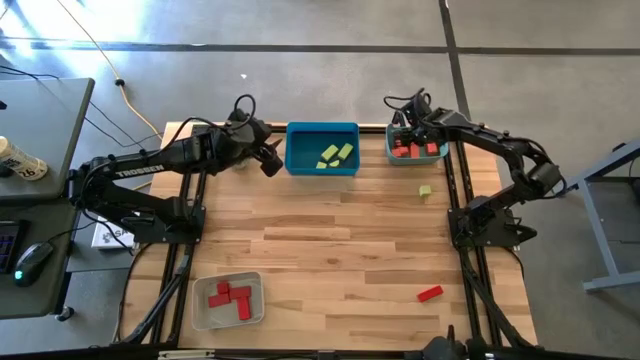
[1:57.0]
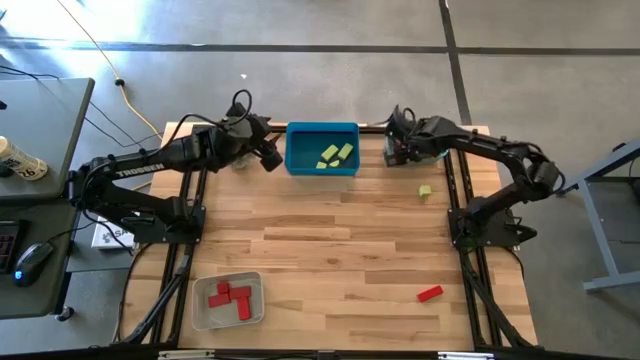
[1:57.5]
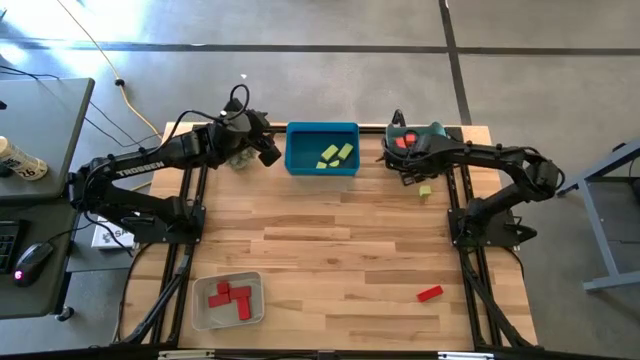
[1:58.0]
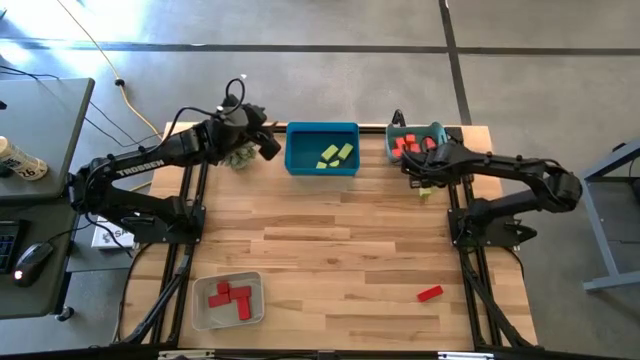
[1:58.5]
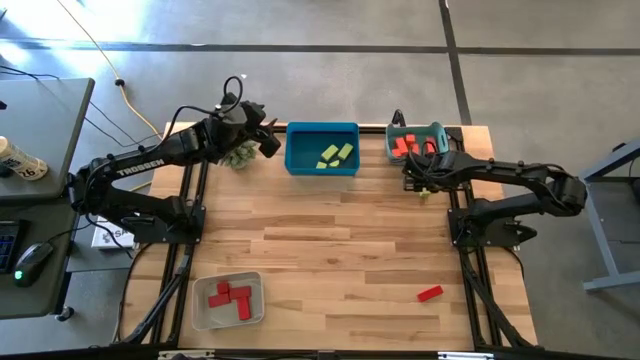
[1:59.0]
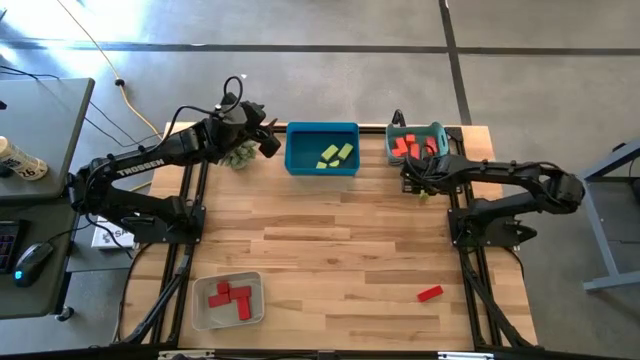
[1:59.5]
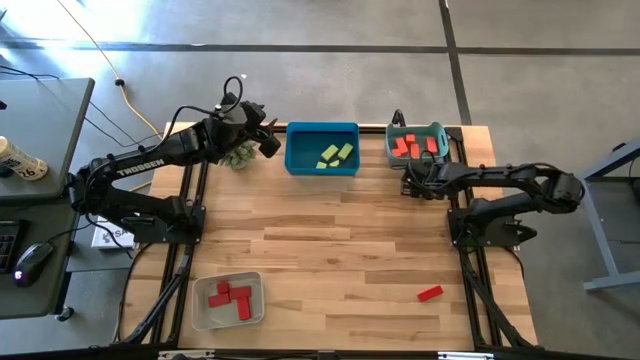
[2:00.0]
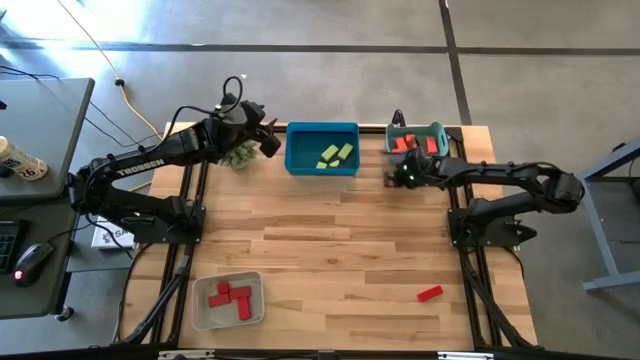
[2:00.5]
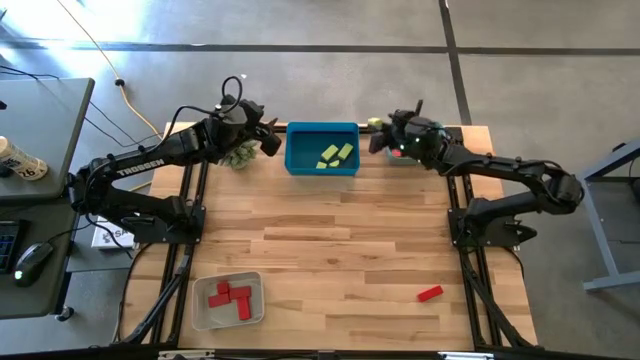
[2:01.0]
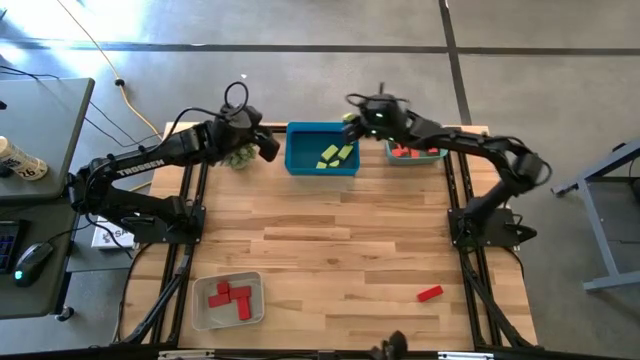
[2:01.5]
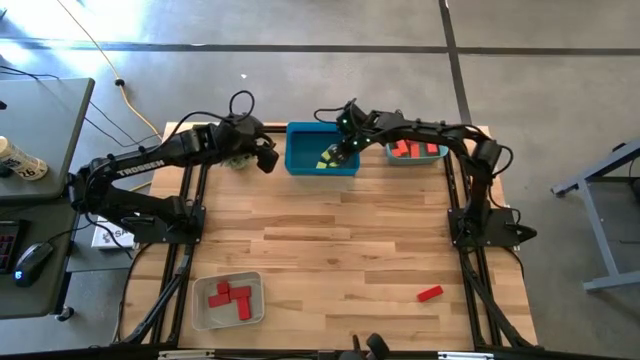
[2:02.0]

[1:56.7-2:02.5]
Task: Sort & place blocks by color
Put the green block into the blue bin

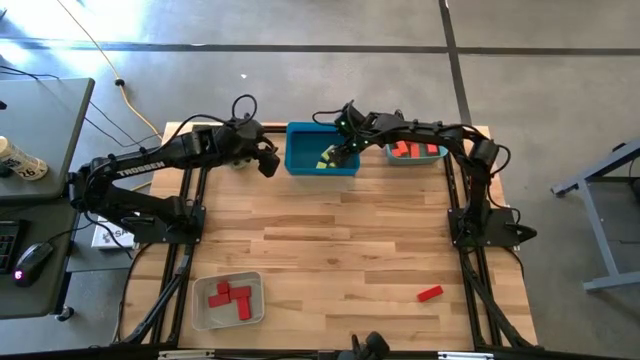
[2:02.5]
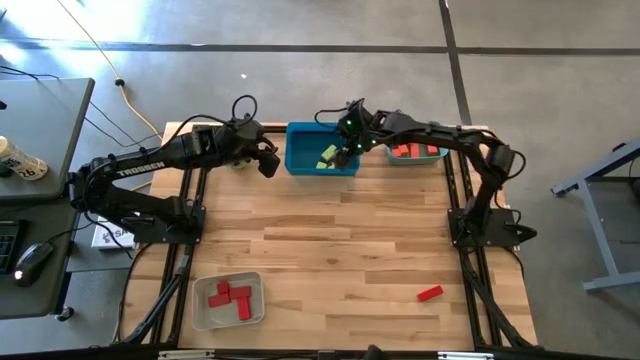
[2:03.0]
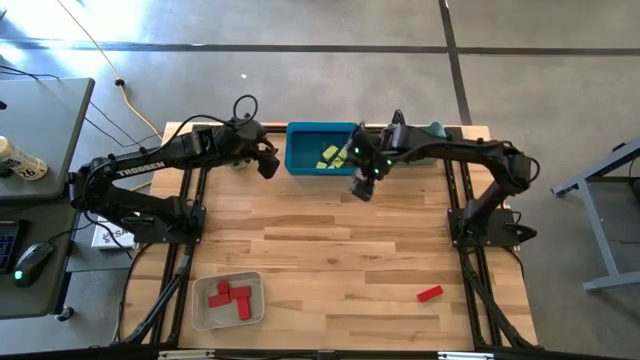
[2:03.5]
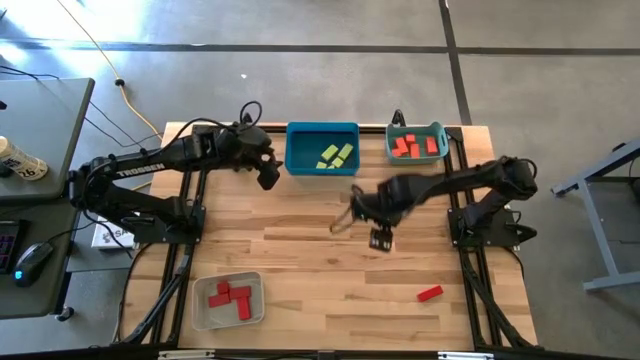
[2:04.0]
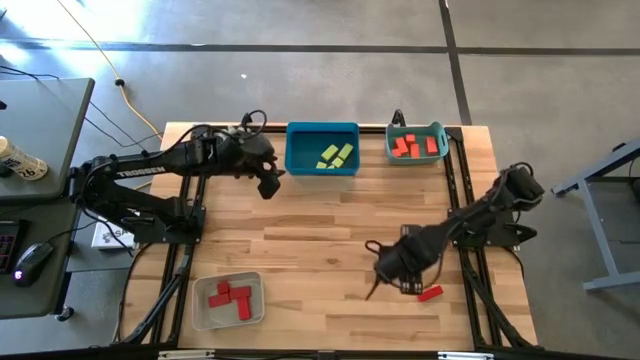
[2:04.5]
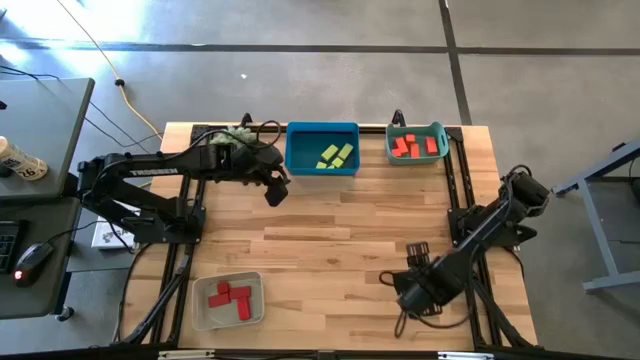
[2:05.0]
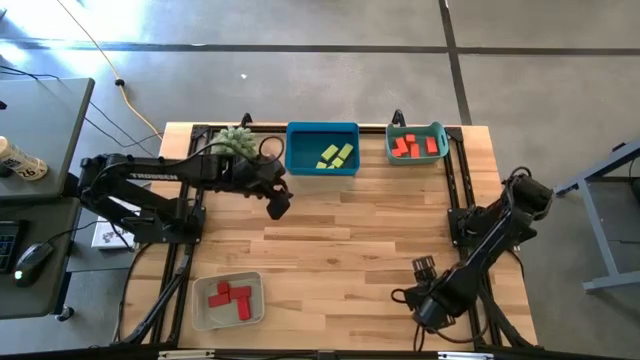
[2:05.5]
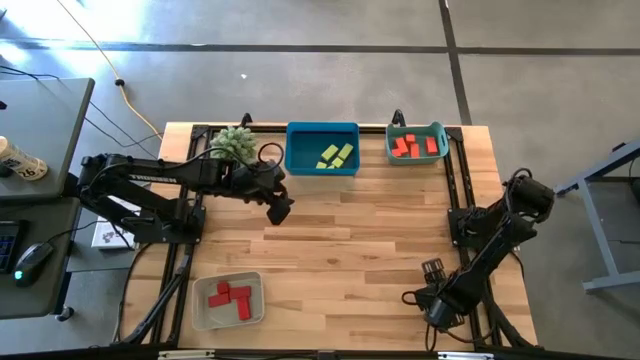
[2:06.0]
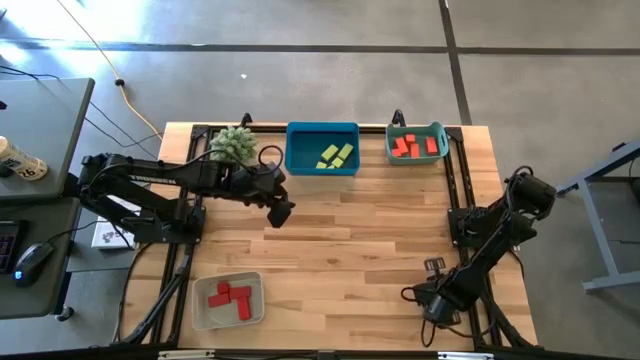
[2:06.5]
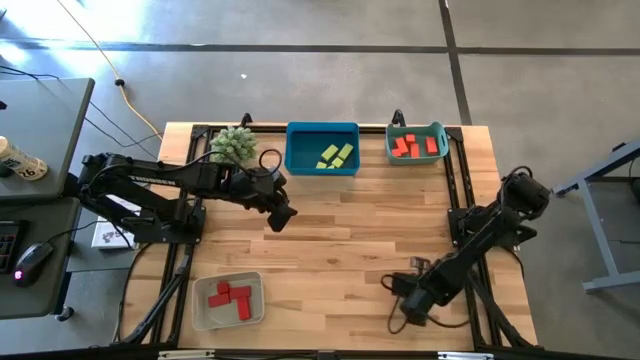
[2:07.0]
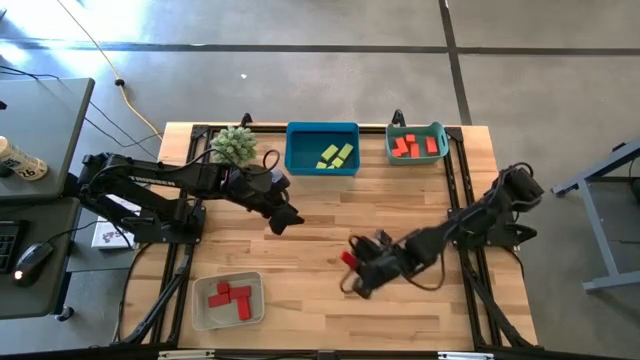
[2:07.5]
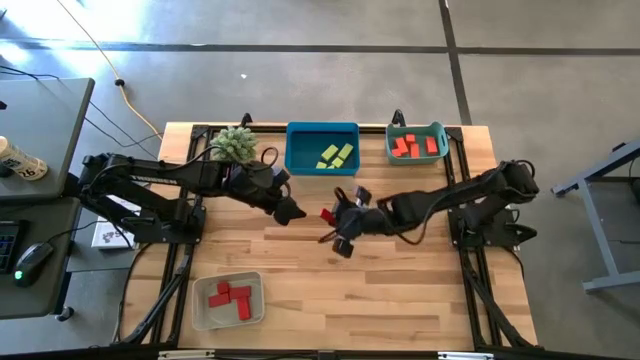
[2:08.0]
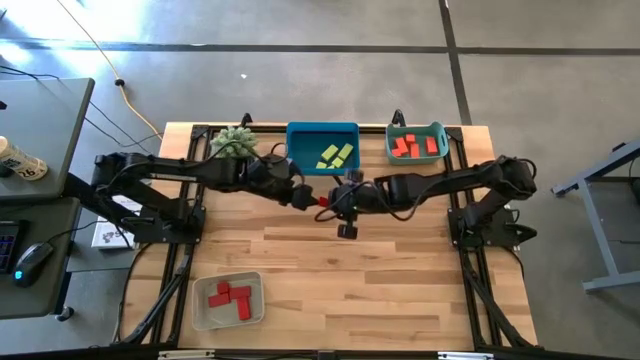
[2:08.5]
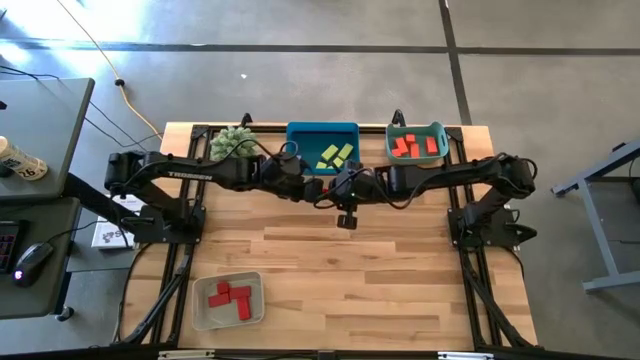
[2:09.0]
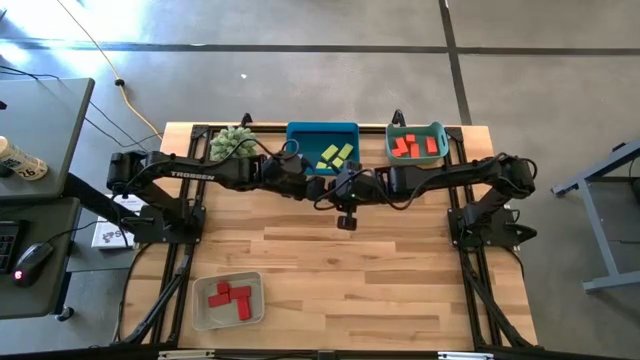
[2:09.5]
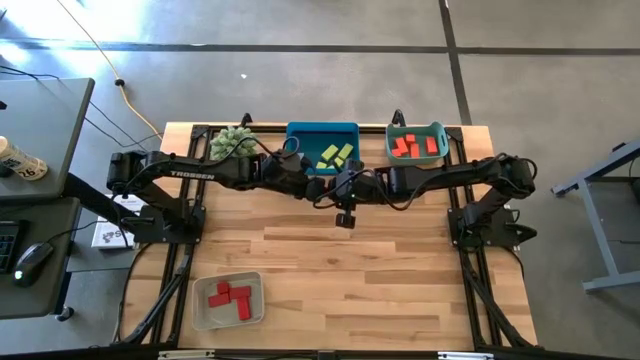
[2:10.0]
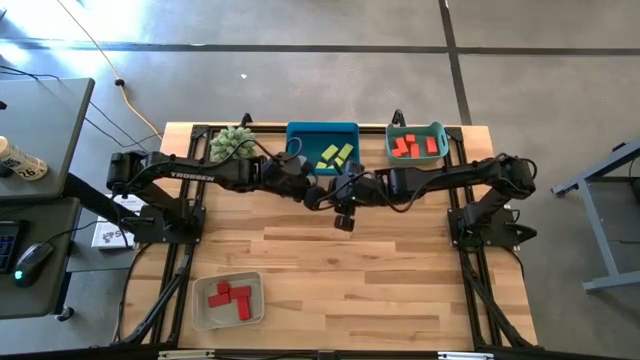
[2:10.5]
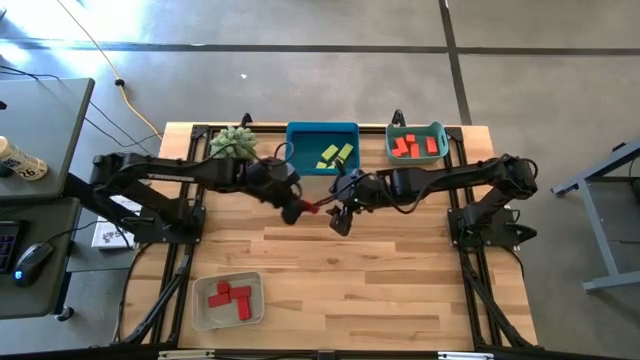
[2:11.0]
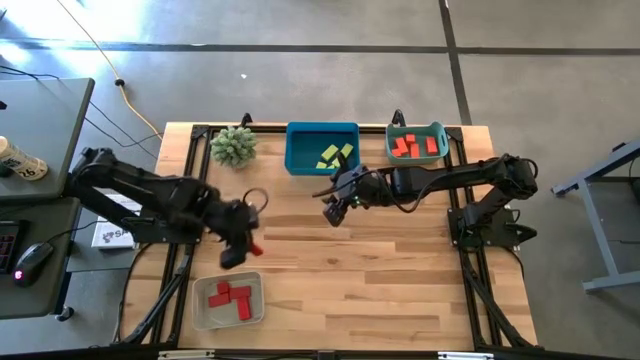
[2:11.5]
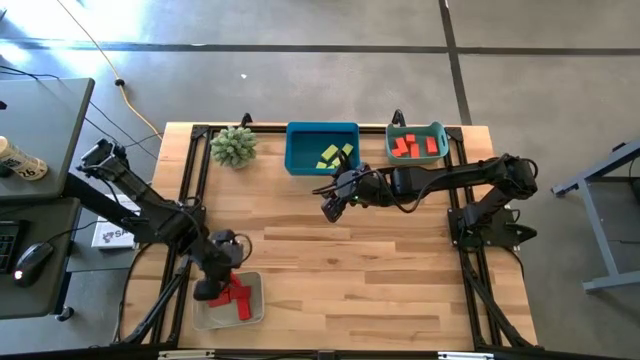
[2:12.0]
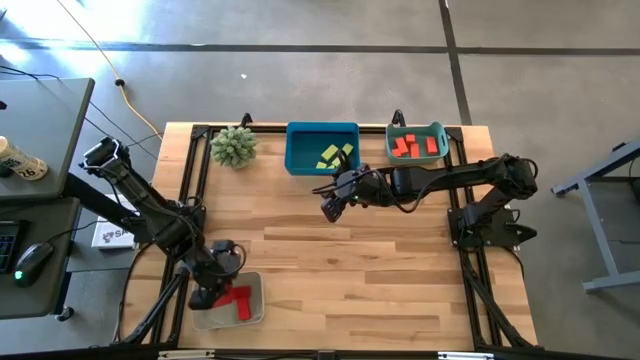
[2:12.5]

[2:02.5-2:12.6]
Put the red block into the gray bin

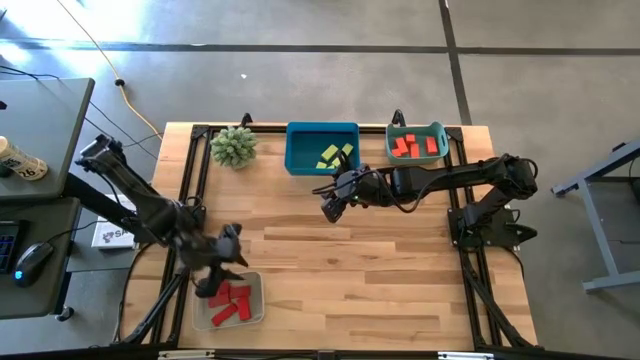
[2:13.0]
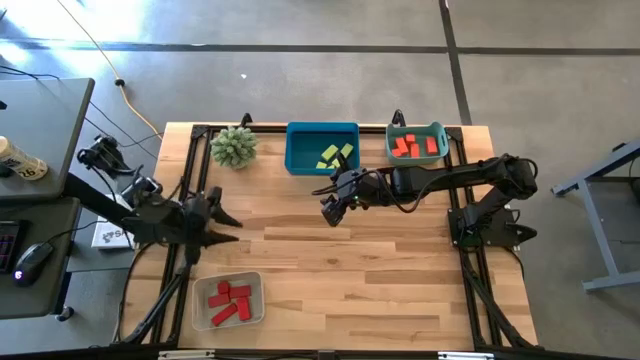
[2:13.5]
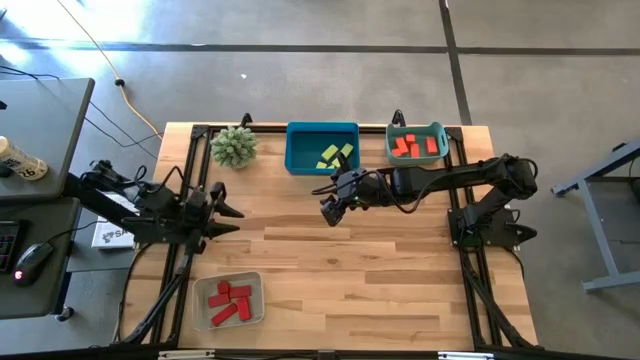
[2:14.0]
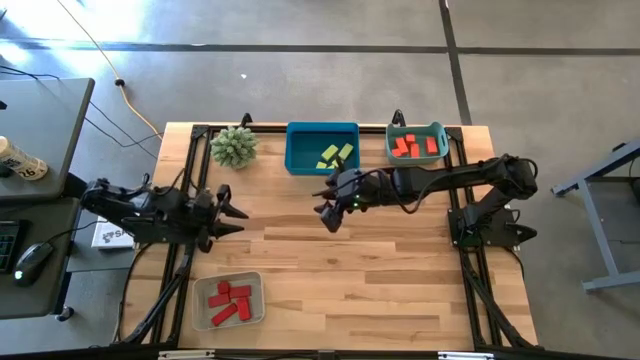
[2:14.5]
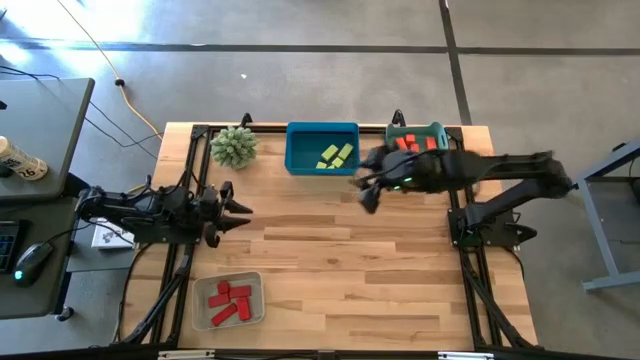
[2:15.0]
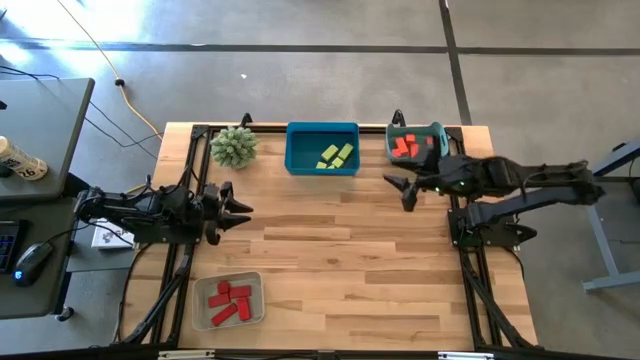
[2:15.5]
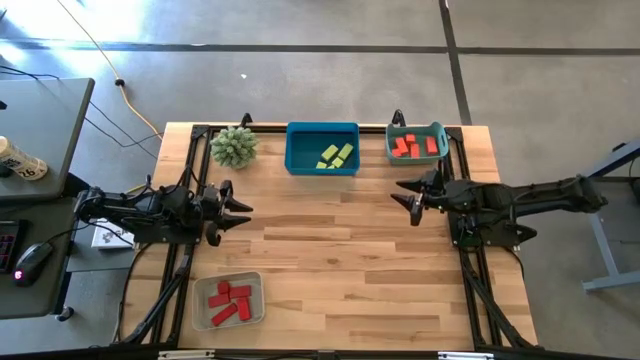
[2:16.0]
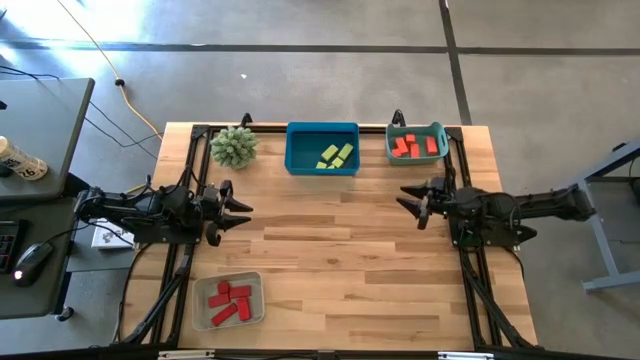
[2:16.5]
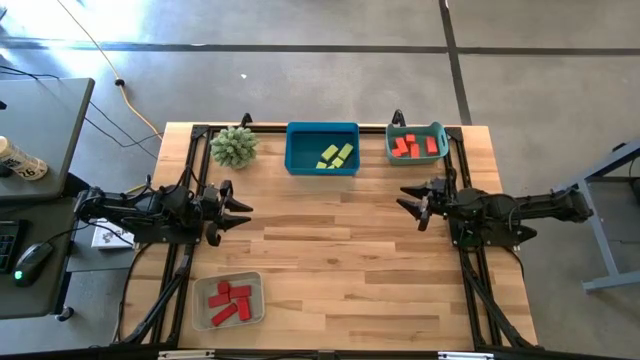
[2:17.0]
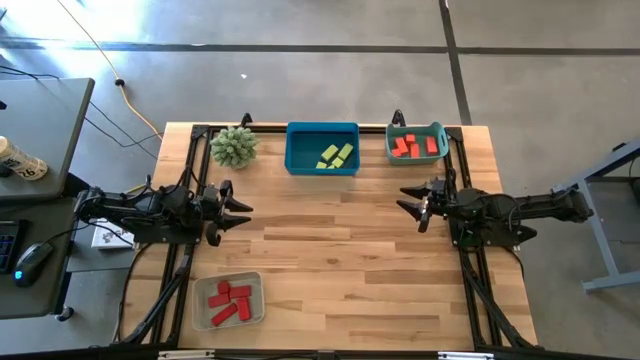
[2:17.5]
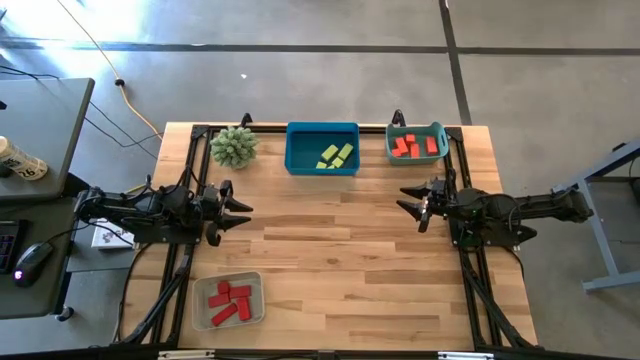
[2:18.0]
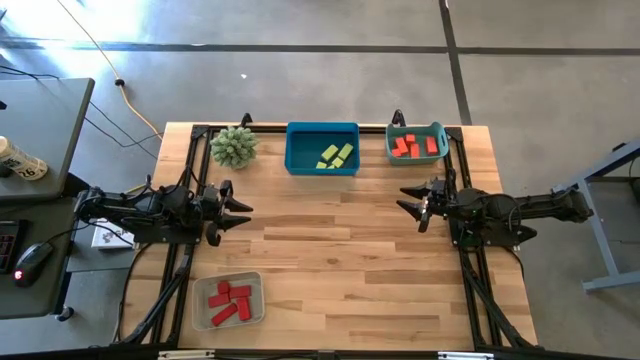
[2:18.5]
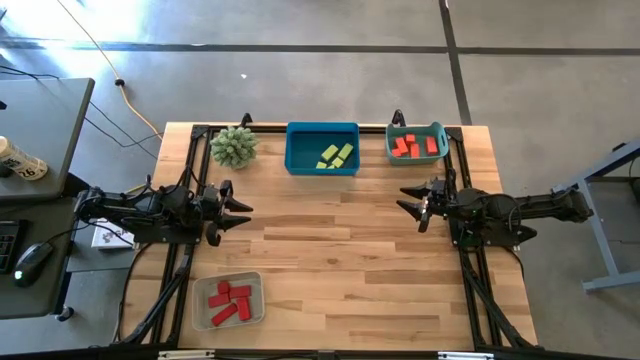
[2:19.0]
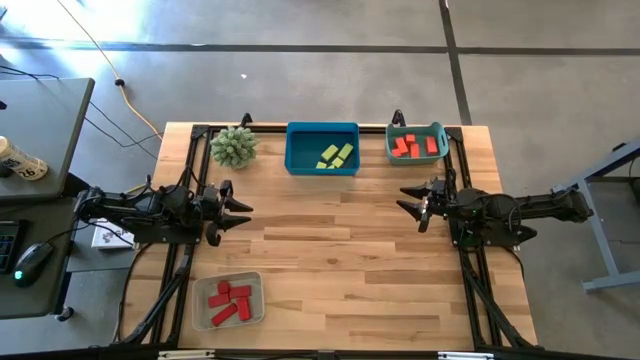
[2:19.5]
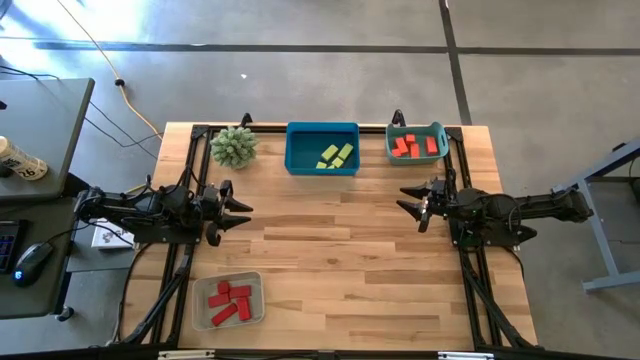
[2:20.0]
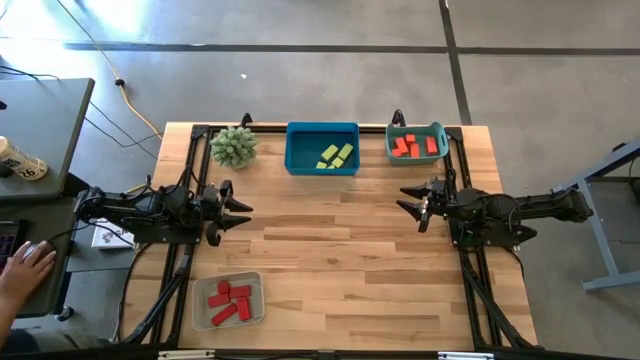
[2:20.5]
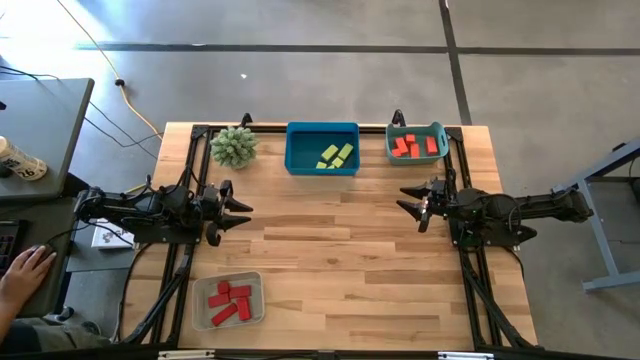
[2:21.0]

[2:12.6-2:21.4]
Return to Home Position
